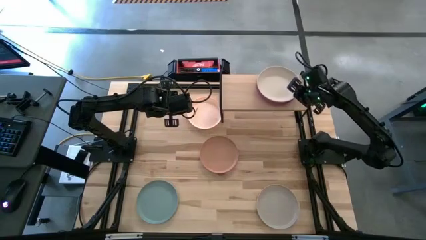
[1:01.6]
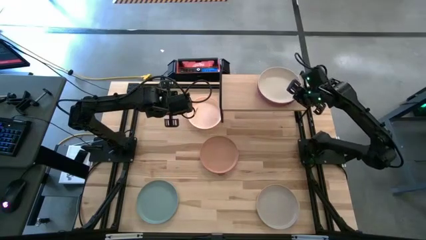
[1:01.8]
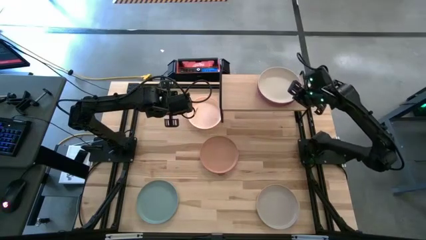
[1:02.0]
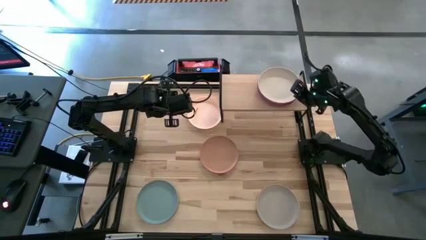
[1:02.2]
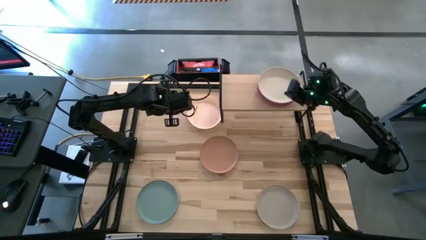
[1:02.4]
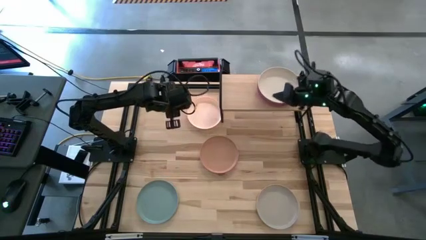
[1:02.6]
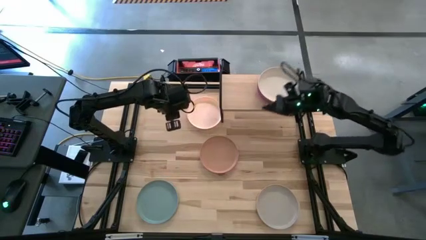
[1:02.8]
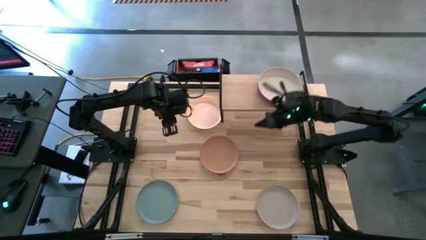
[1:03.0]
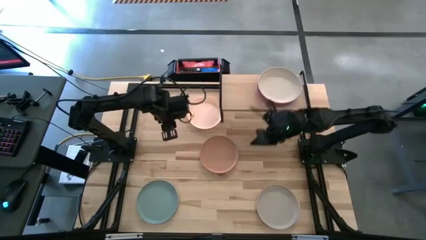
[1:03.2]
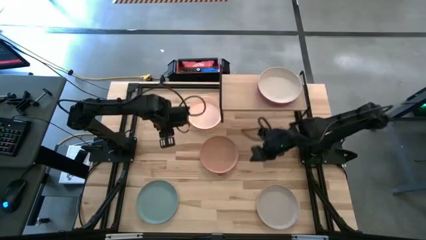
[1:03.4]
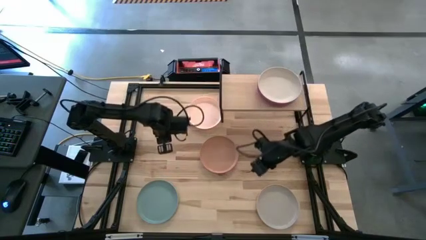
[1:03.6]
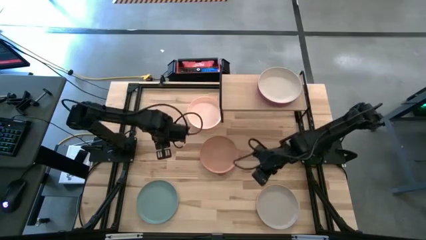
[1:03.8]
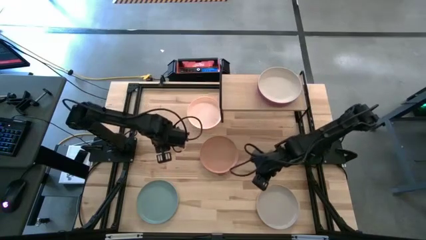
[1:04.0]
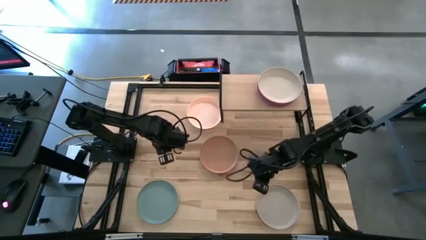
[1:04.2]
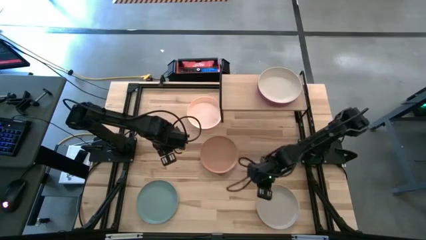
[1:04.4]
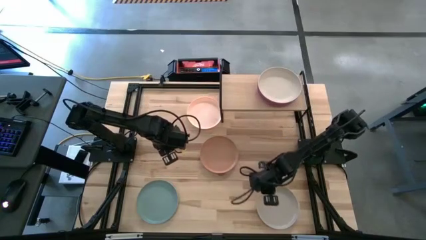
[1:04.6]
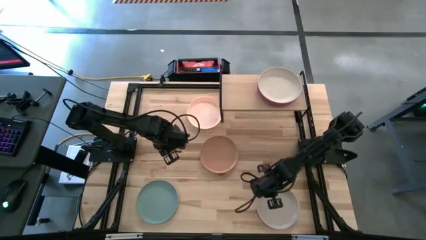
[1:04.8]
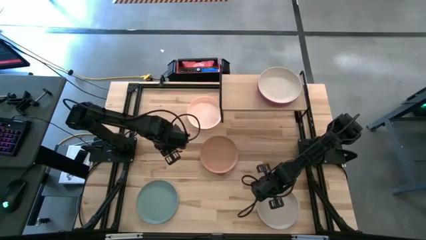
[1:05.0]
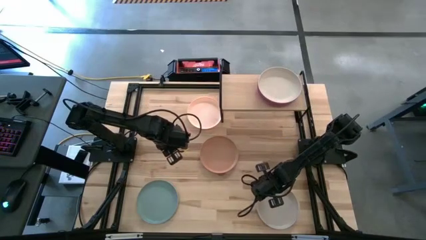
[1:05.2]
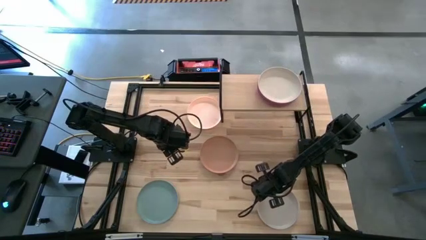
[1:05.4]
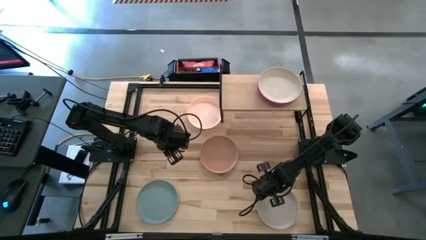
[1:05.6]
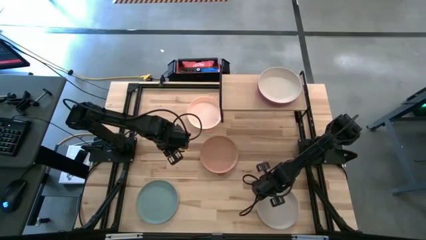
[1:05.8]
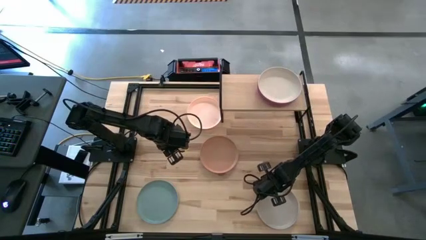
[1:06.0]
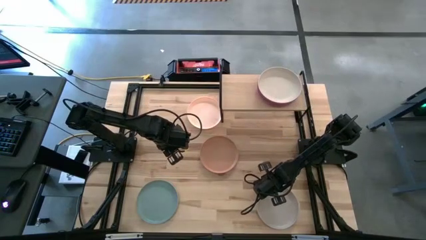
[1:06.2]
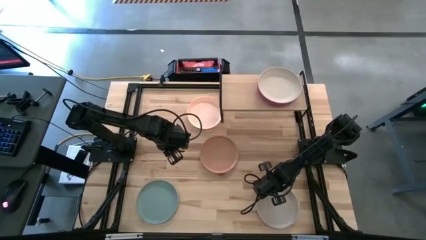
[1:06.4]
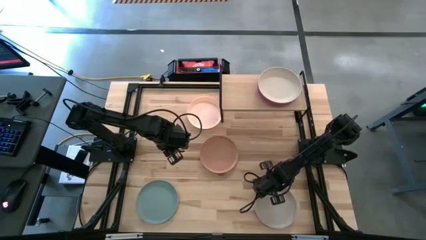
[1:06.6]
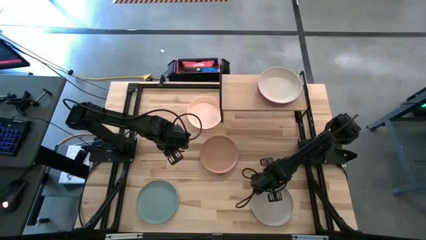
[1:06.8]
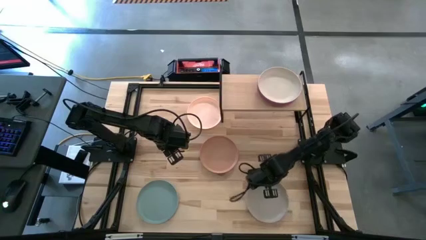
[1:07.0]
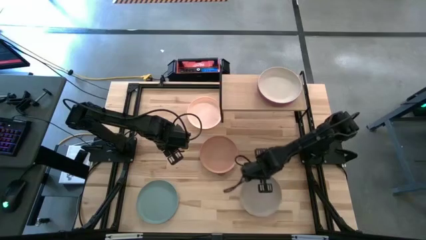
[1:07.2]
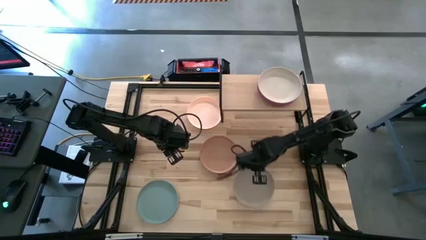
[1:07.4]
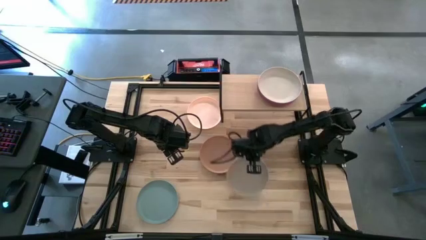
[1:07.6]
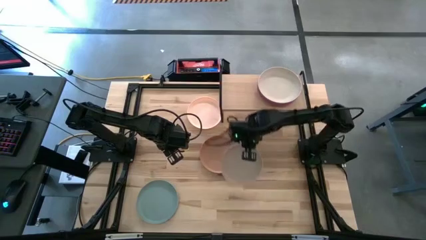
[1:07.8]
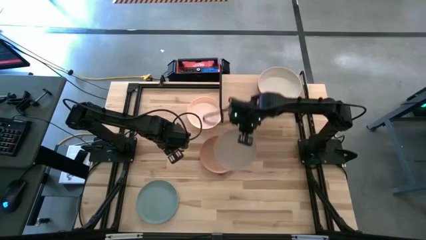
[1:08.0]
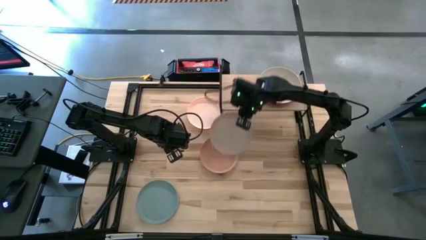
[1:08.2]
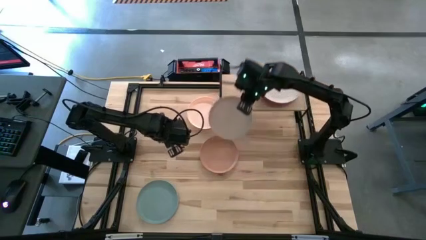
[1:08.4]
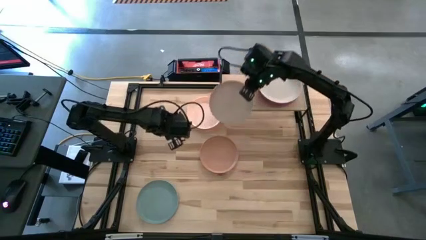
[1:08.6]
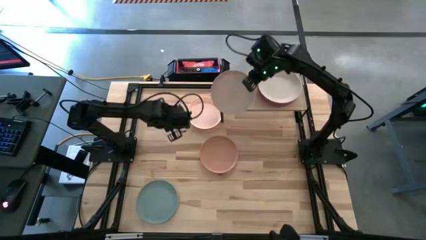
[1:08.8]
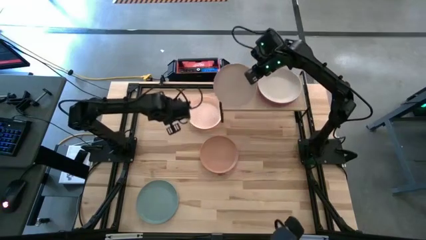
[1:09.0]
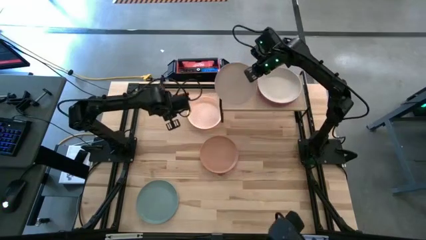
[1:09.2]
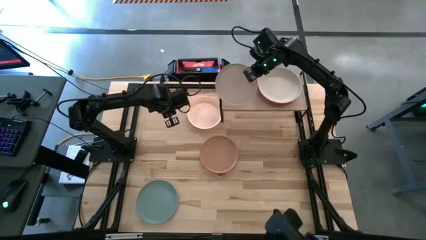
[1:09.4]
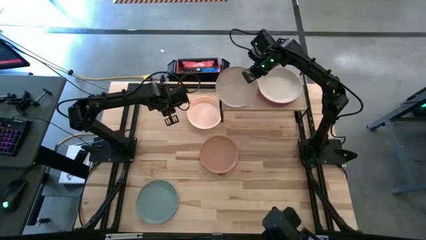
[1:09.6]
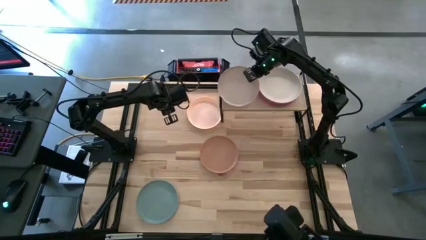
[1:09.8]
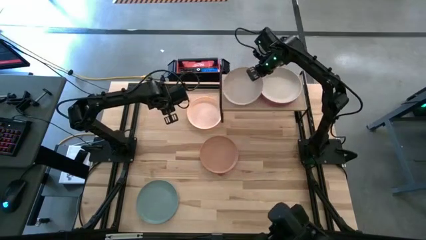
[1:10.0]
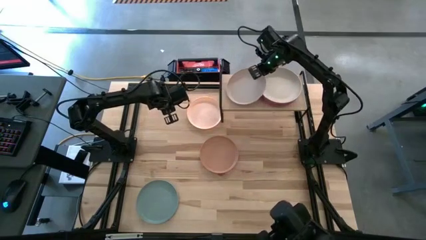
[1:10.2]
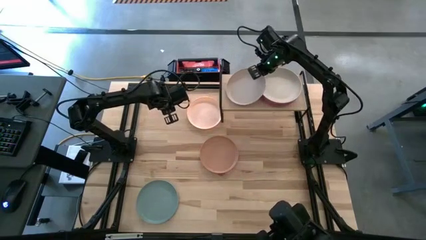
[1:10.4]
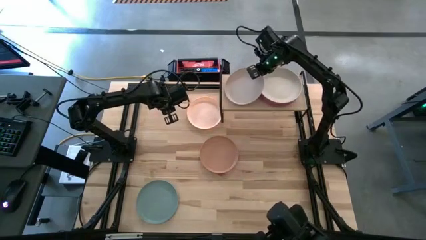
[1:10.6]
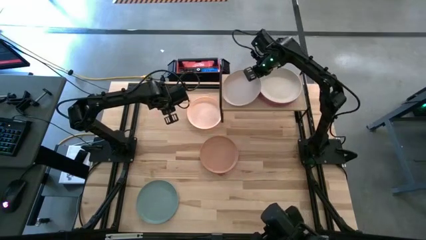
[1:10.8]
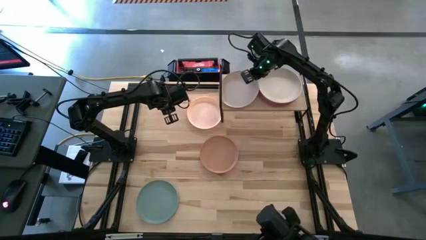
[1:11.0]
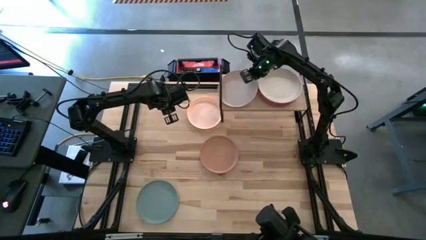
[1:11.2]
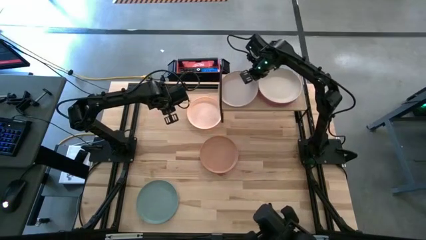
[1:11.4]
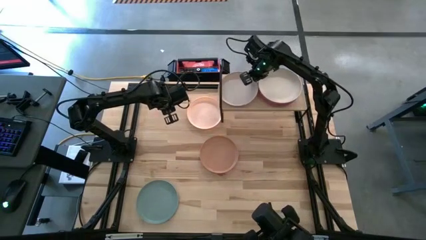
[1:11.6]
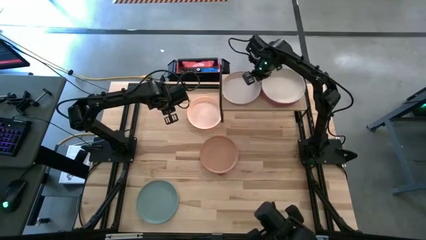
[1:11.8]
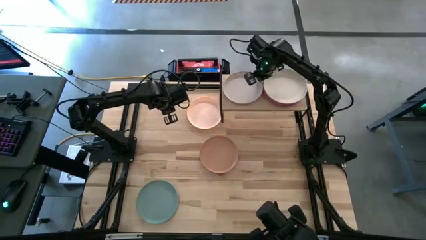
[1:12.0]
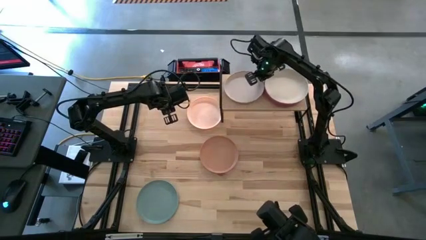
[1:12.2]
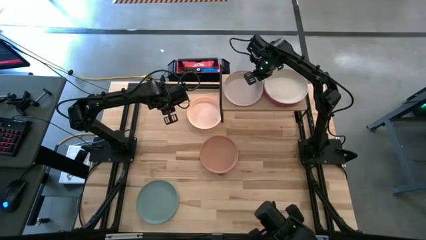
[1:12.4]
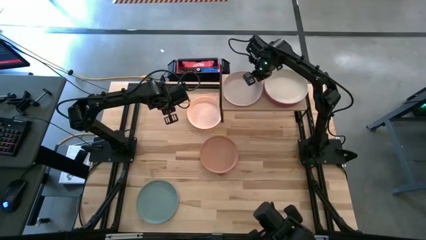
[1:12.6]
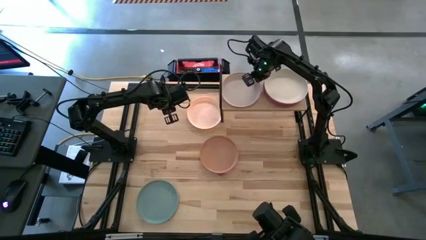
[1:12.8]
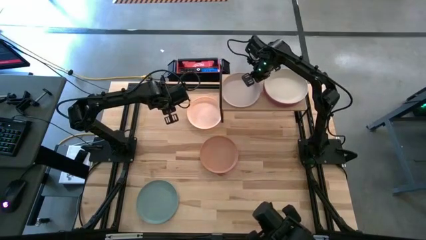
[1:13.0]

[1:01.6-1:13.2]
Task: Place and stack plates onto a shelf
Put the white plate on the shelf

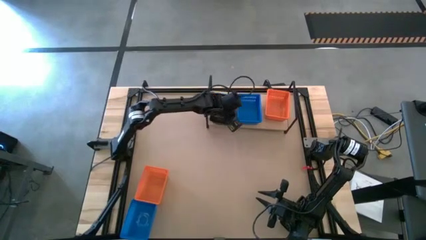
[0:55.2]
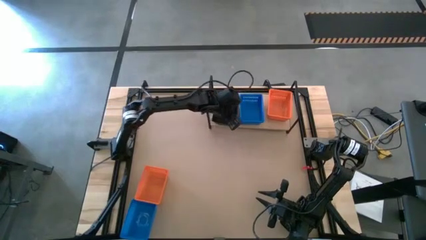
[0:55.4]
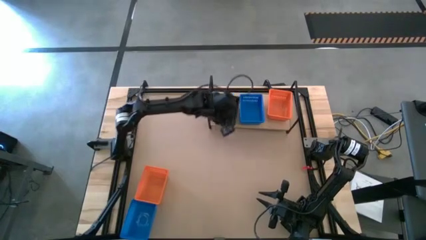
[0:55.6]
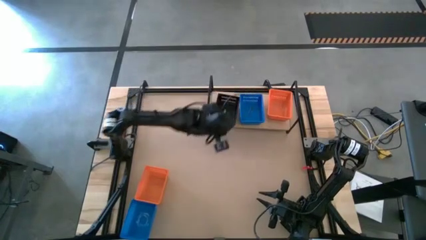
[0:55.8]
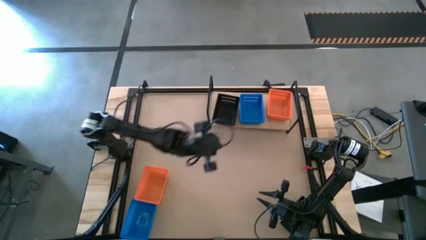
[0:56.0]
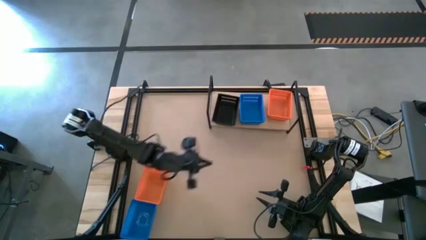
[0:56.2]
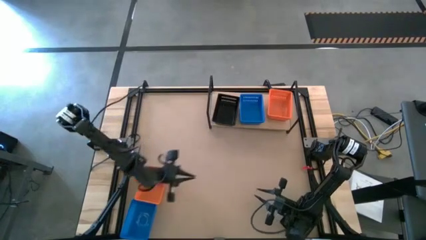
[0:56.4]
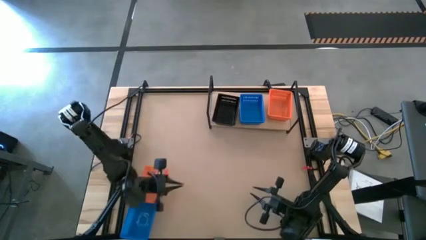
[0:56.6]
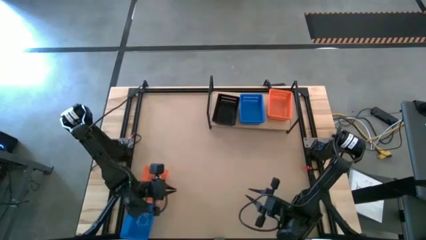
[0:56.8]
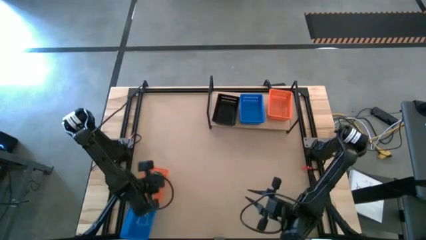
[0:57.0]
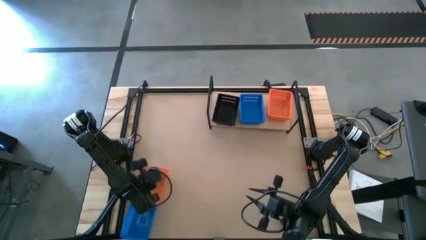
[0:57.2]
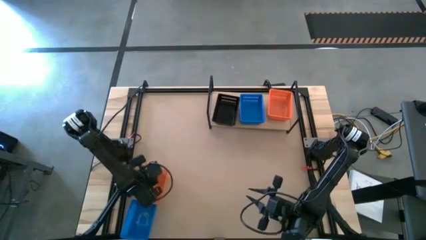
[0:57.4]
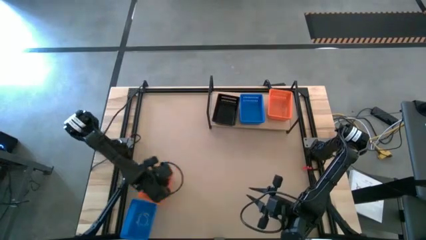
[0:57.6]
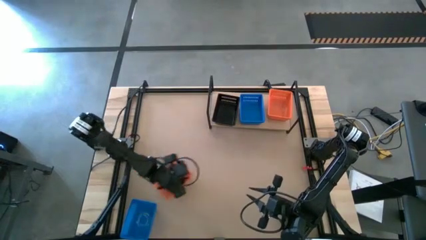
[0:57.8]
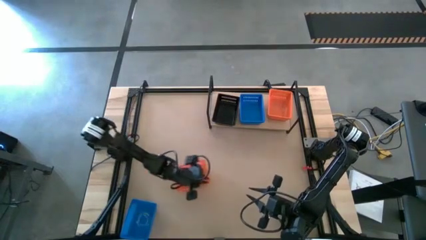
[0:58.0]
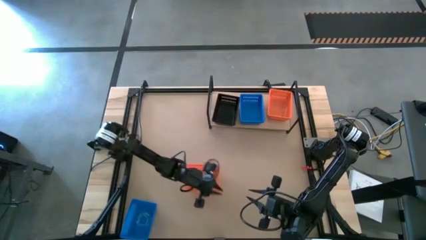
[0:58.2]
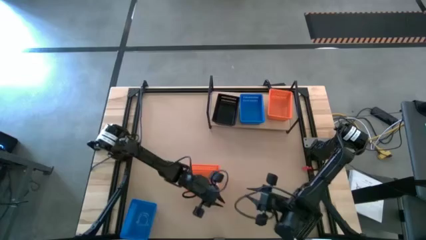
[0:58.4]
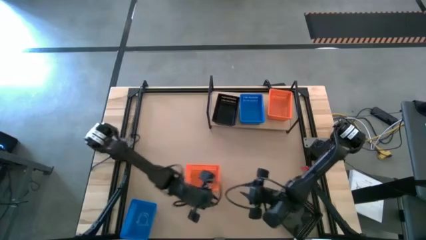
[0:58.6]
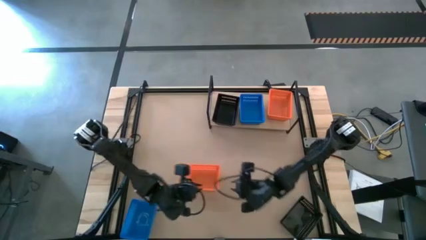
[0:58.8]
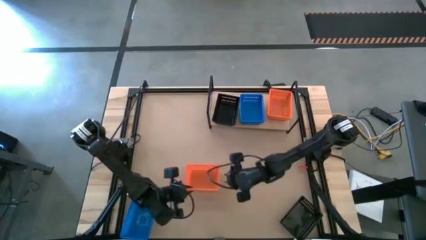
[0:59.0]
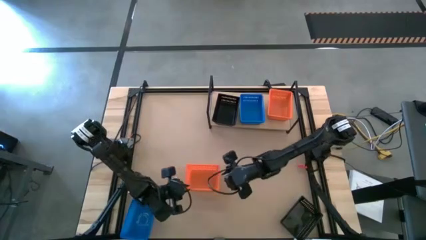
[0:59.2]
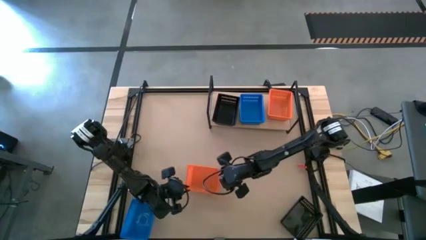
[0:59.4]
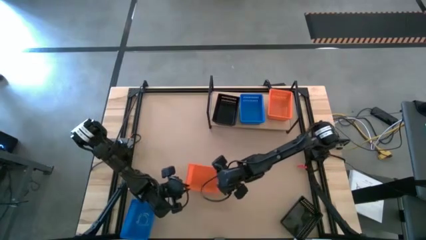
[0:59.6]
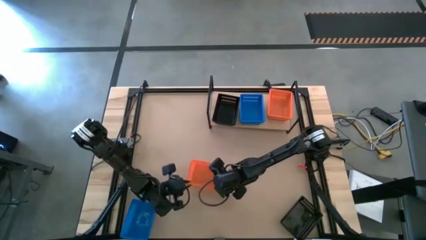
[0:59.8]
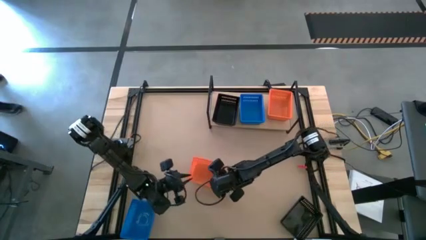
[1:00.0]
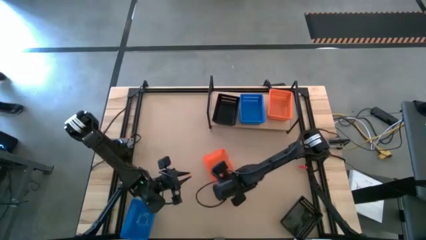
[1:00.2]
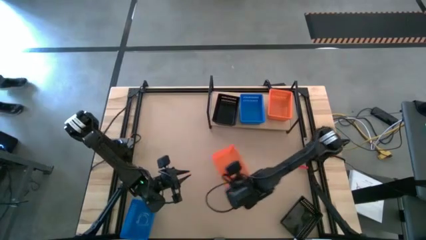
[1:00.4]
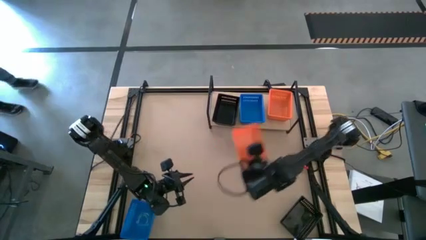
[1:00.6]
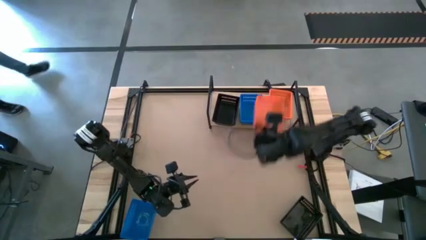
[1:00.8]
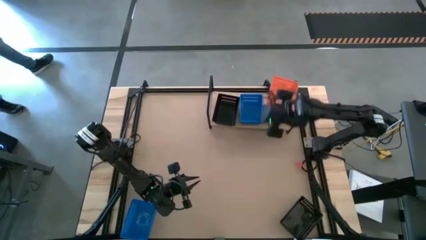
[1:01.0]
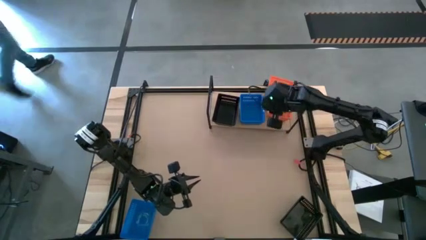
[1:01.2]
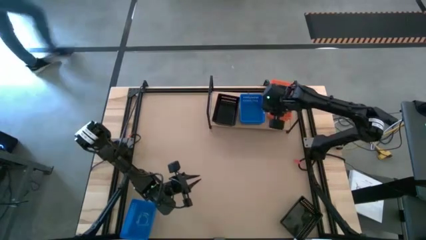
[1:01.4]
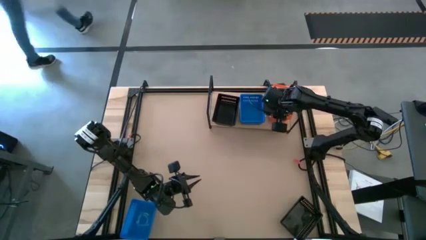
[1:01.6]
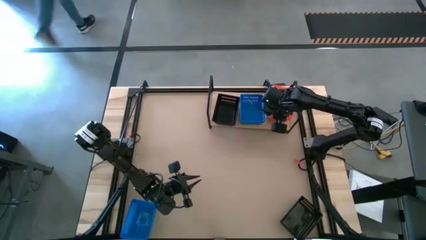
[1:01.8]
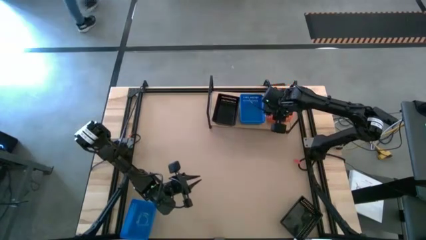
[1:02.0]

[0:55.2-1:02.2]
Task: Stack baskets on shelf by color
Stack the orange basket on top of the orange basket on the shelf
